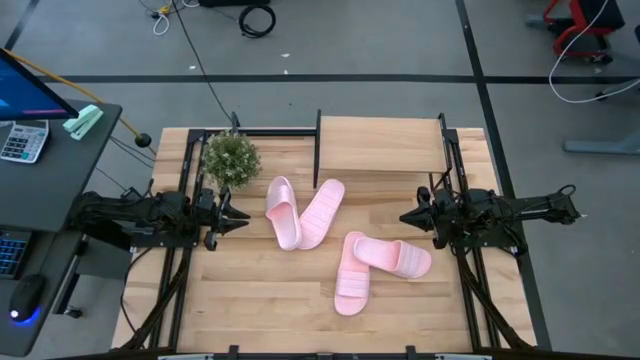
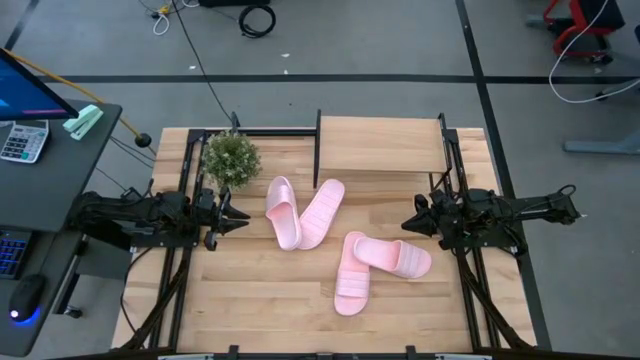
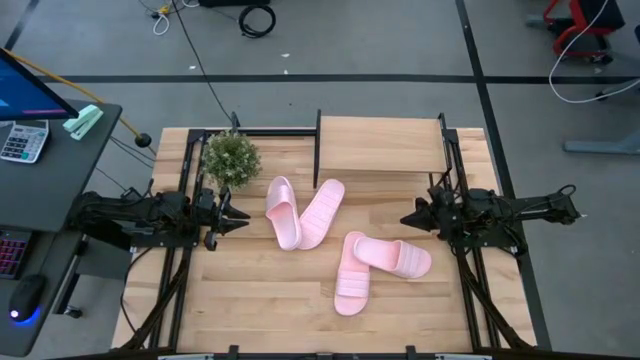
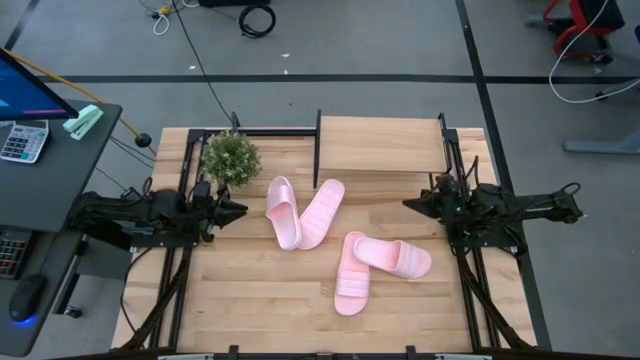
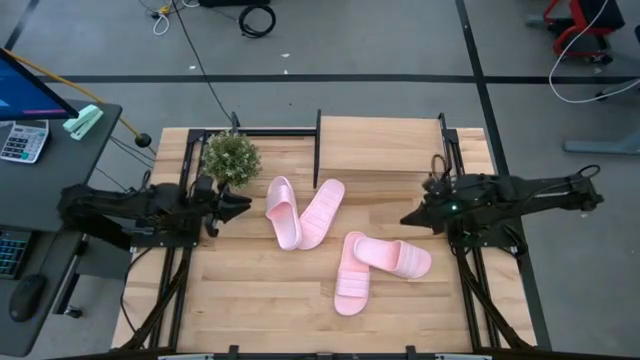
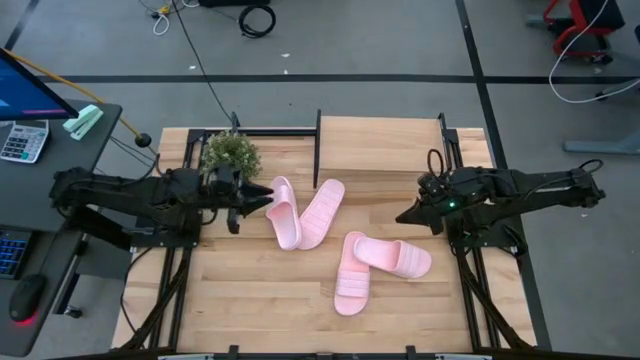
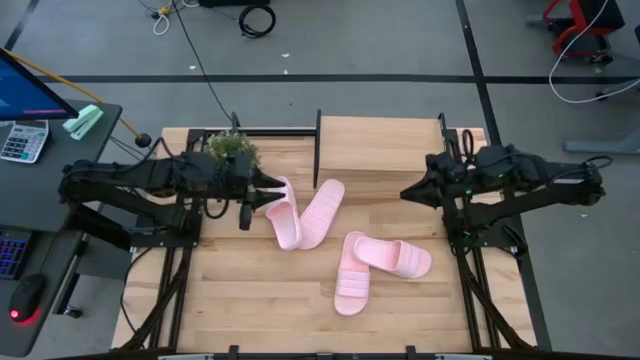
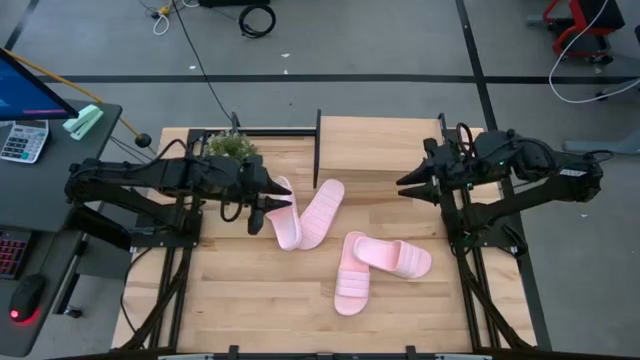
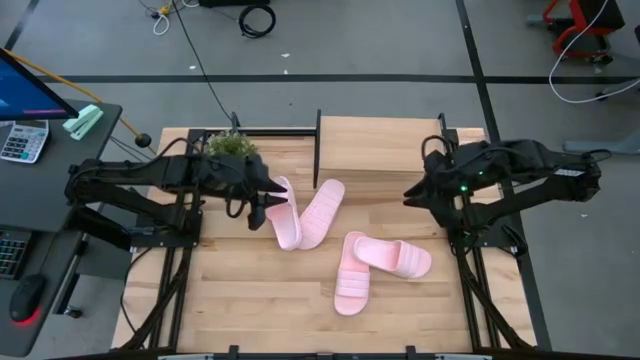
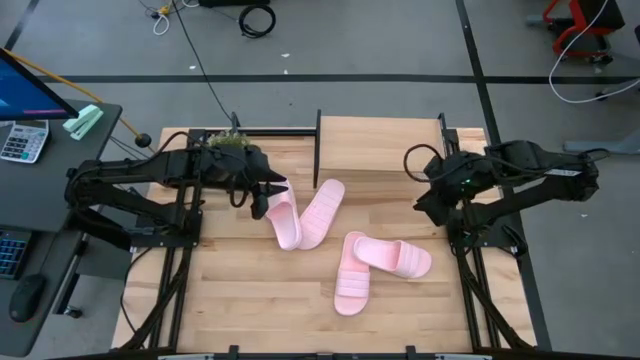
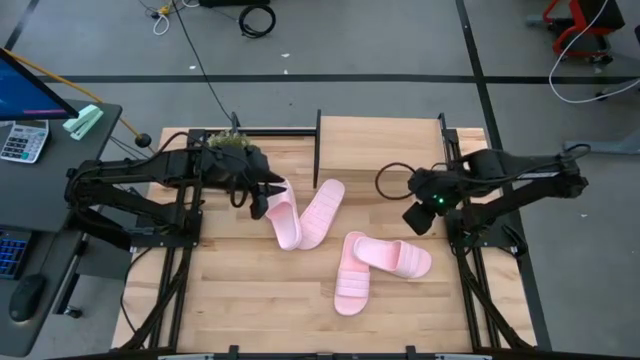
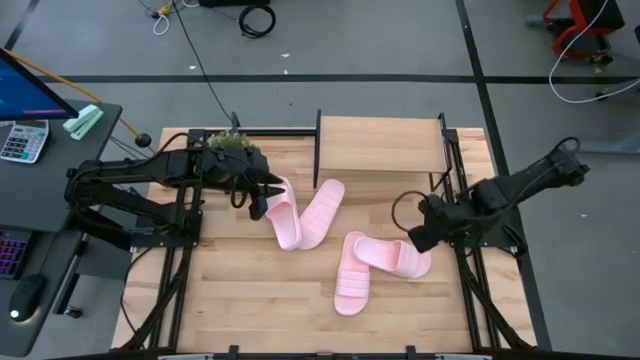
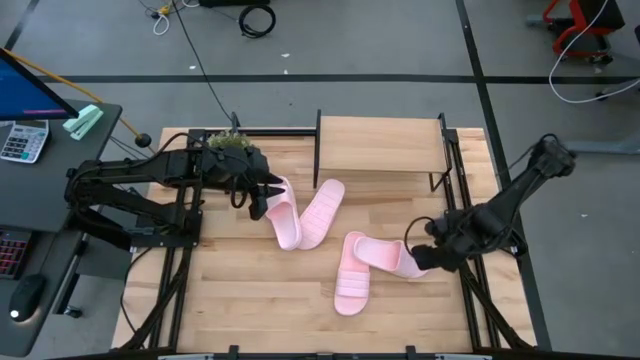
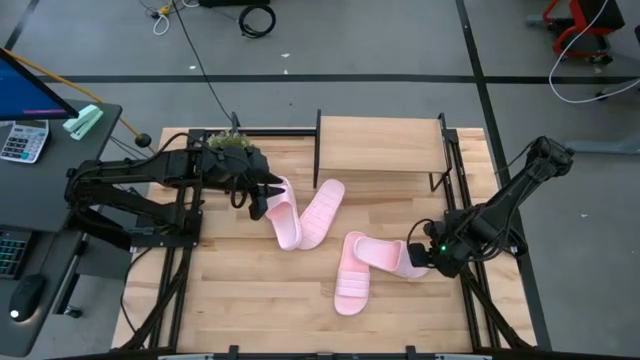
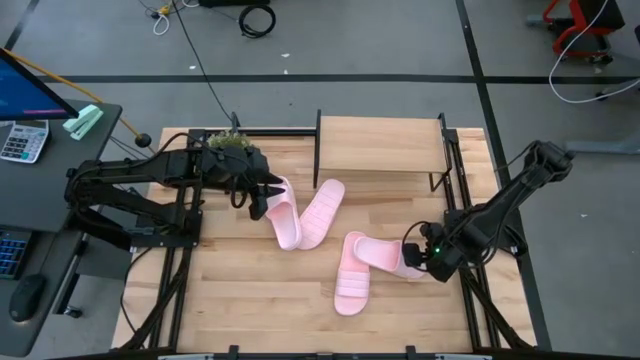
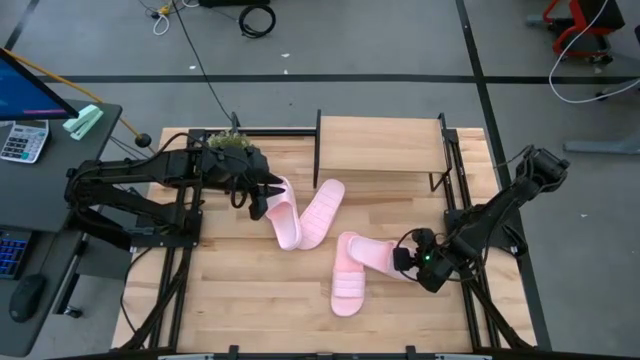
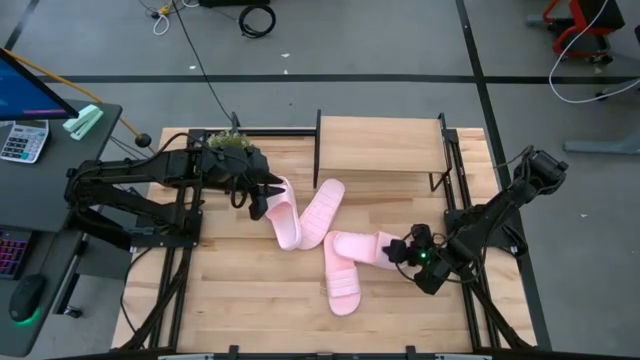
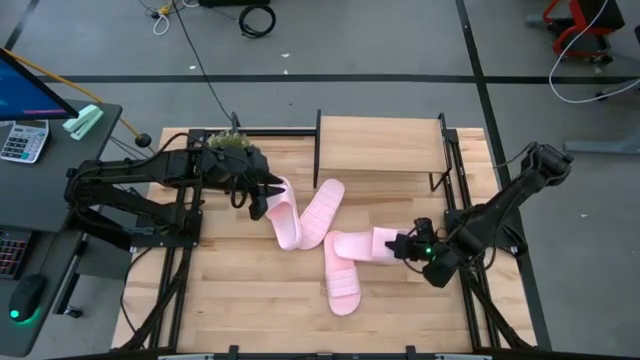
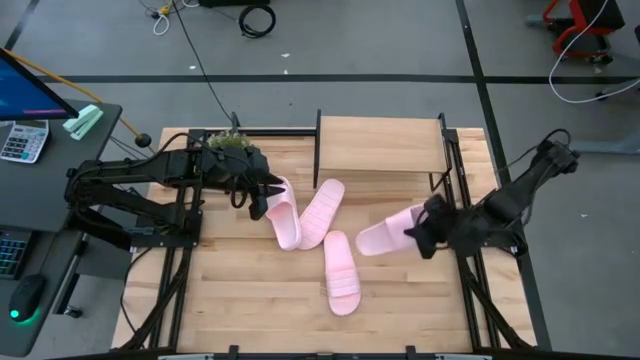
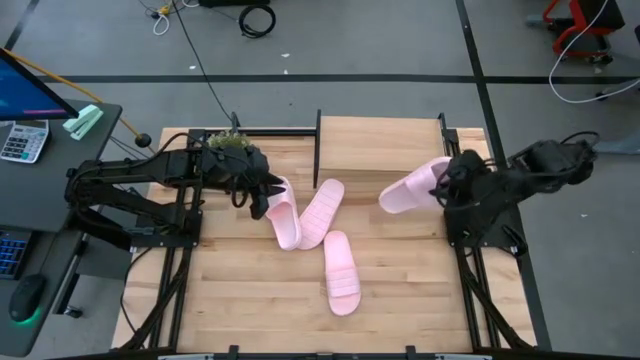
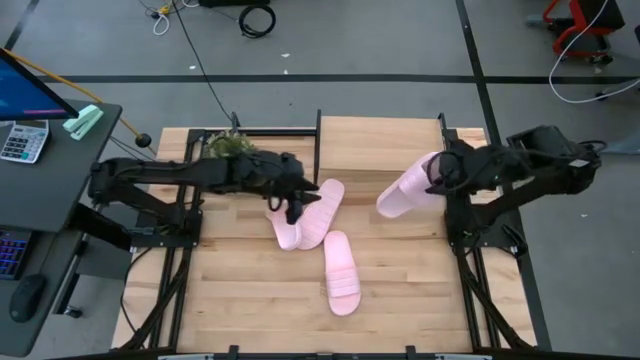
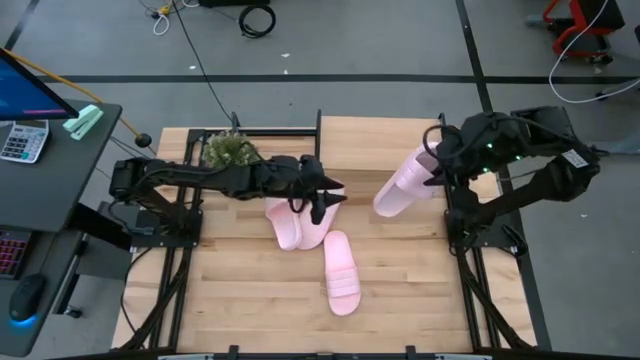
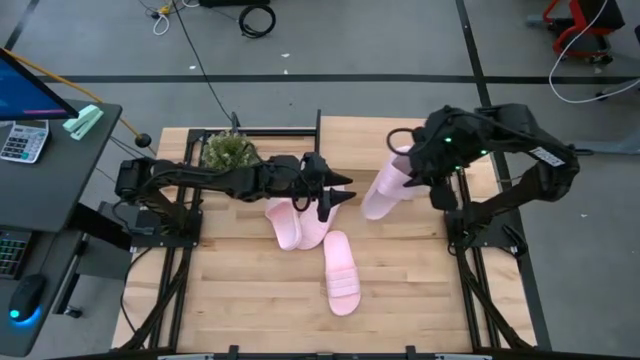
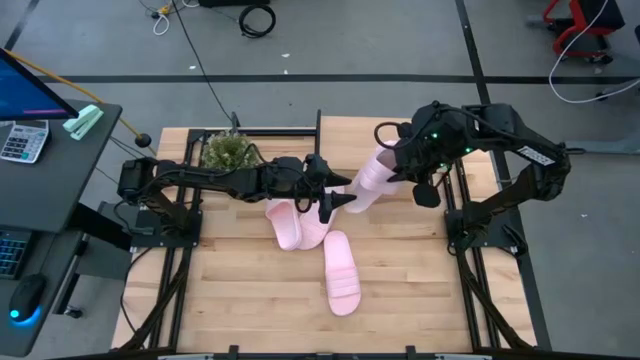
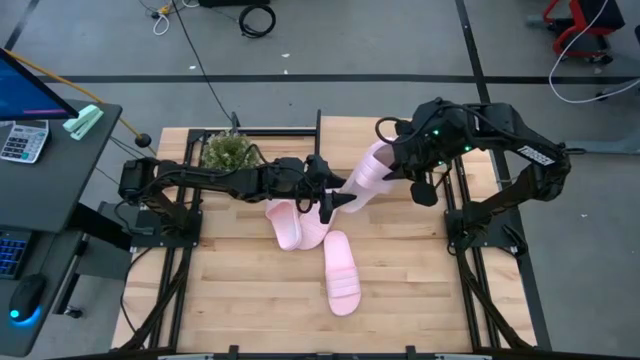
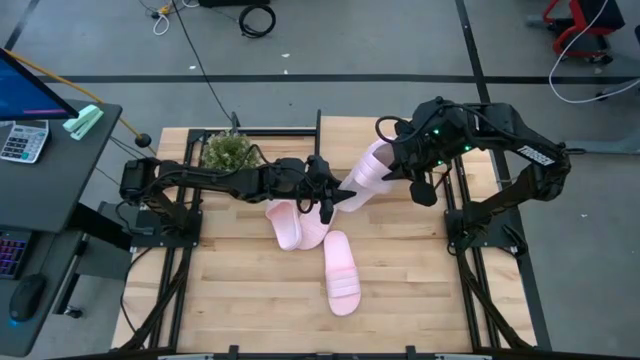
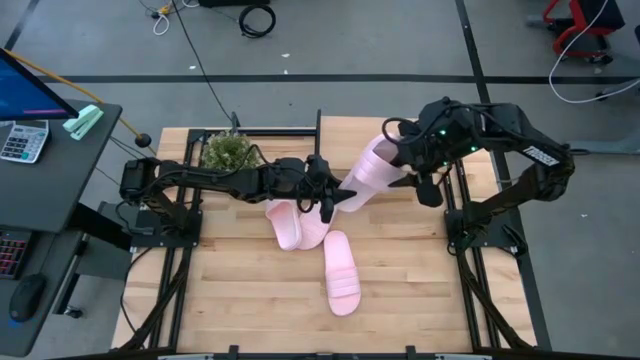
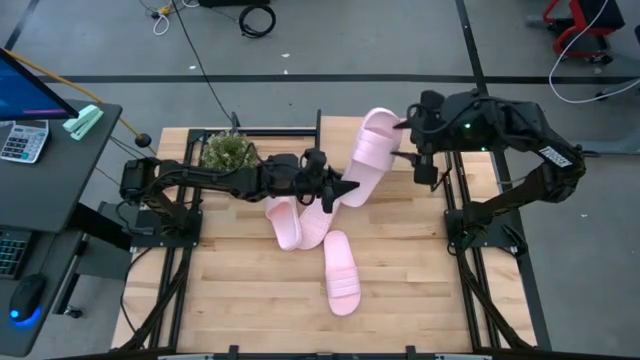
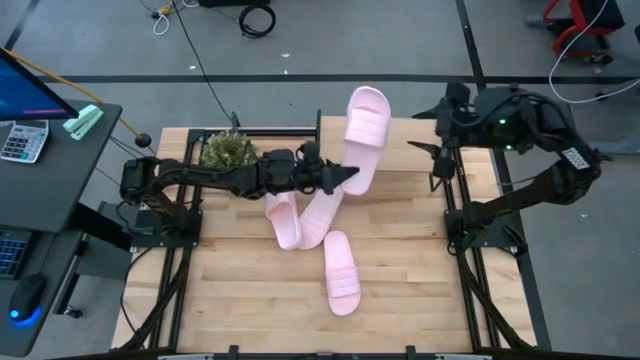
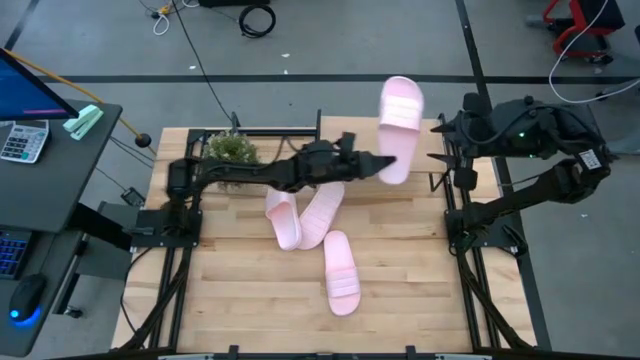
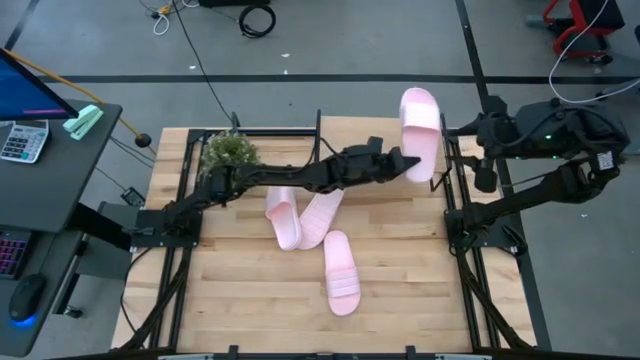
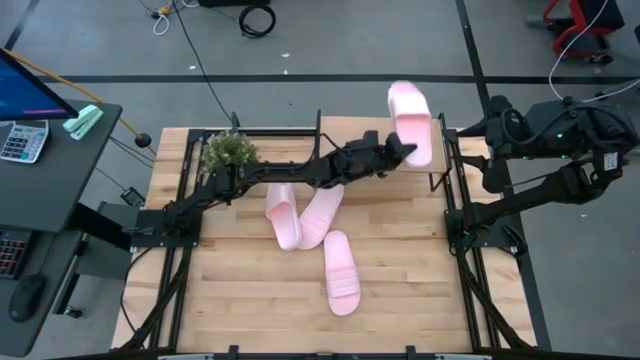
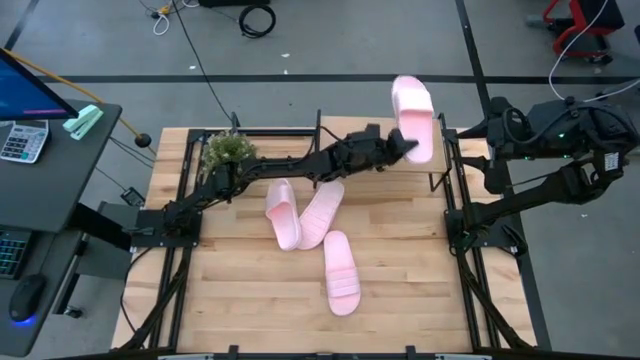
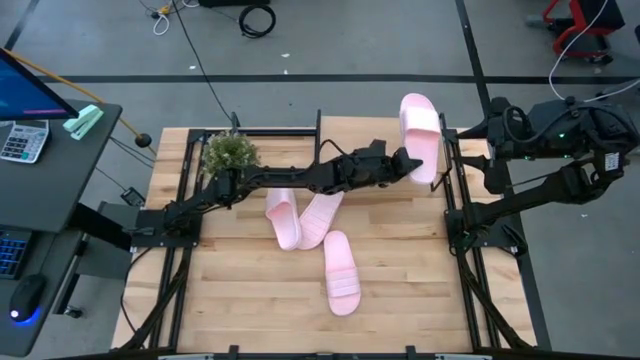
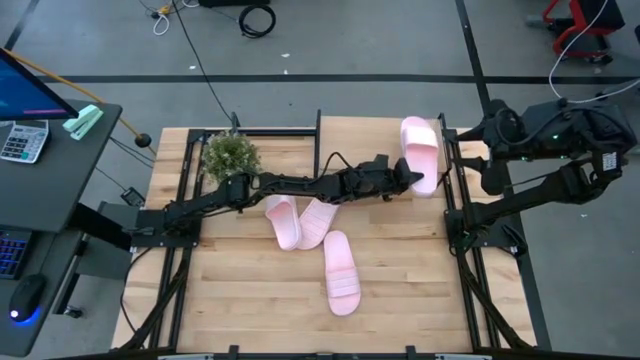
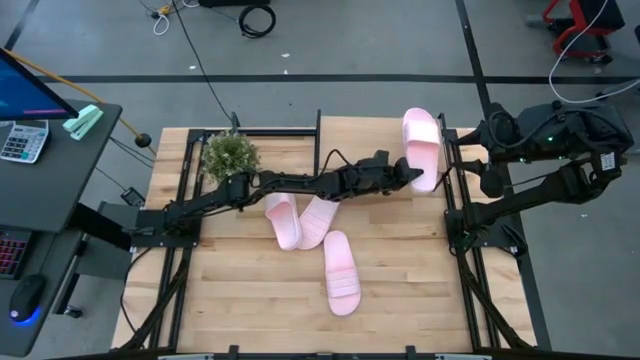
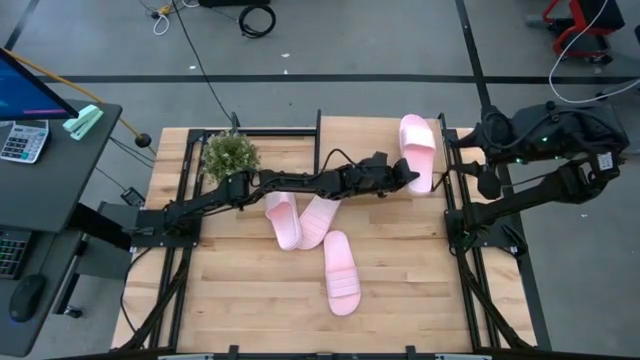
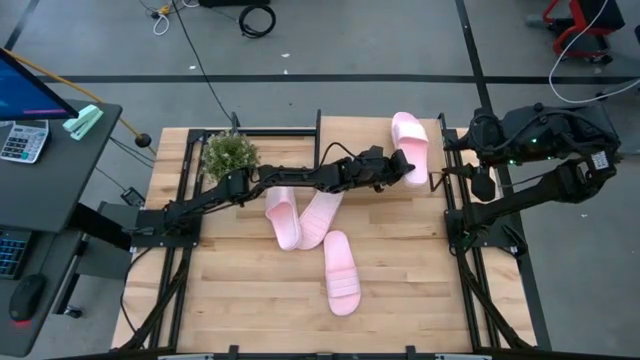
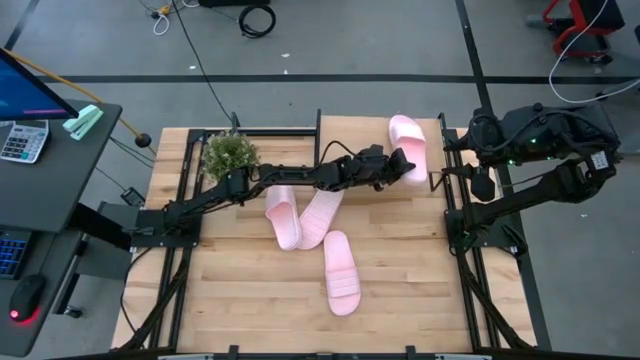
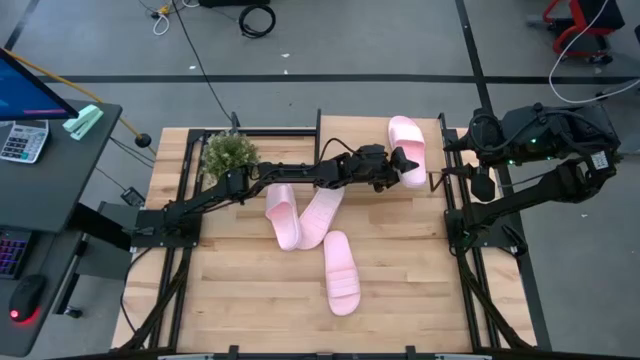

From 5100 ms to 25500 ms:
Task: Pick and place slides into the shelf
Put the bottom right pink slide on the shelf
